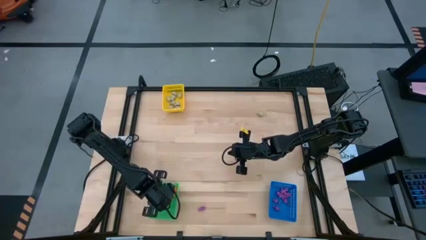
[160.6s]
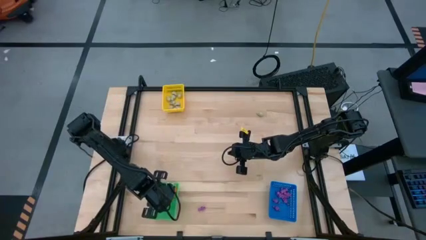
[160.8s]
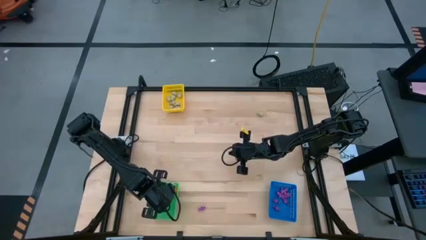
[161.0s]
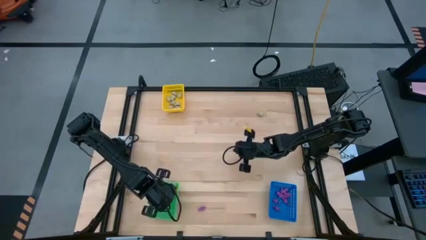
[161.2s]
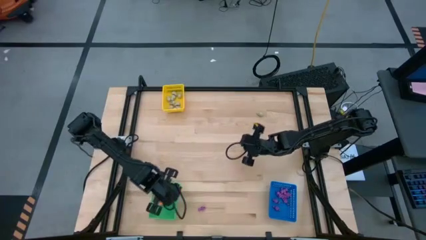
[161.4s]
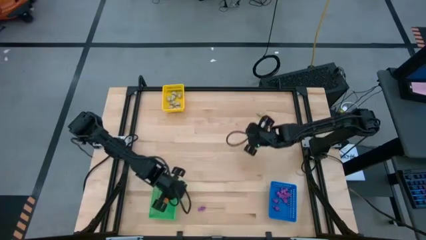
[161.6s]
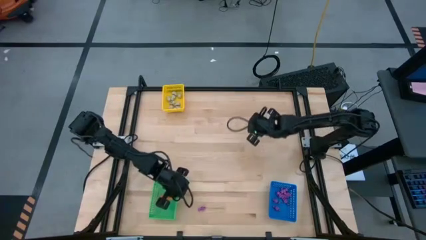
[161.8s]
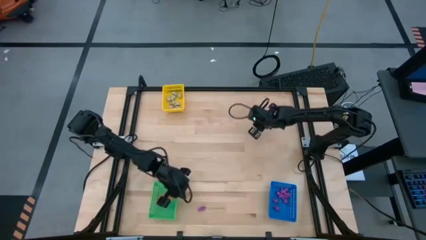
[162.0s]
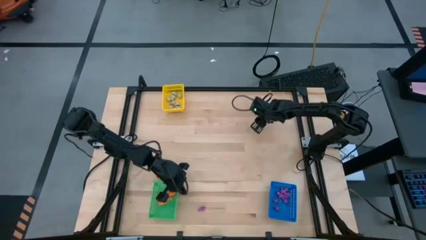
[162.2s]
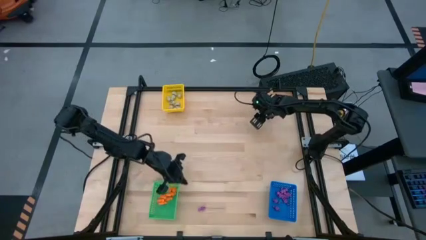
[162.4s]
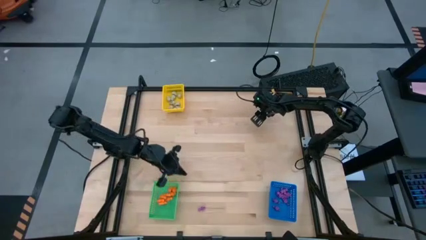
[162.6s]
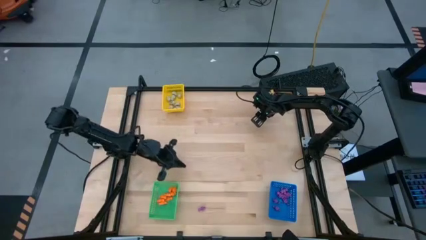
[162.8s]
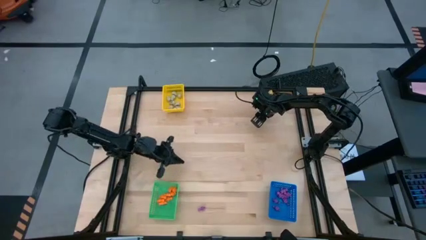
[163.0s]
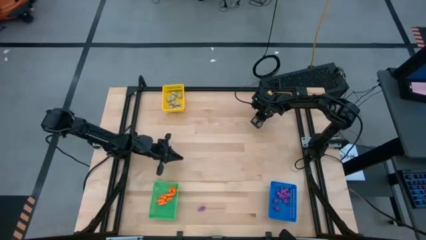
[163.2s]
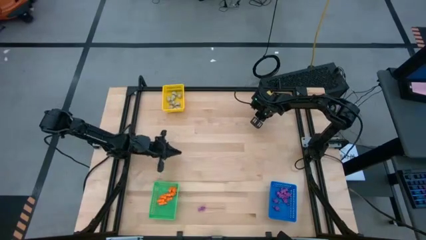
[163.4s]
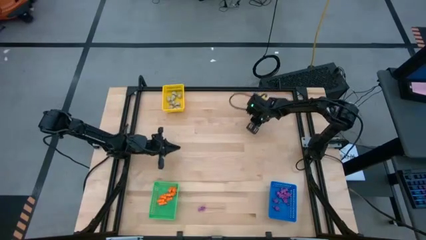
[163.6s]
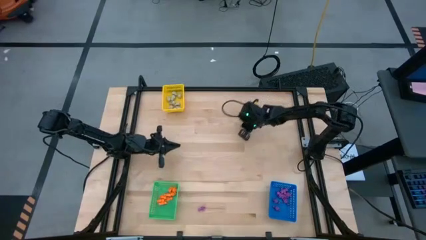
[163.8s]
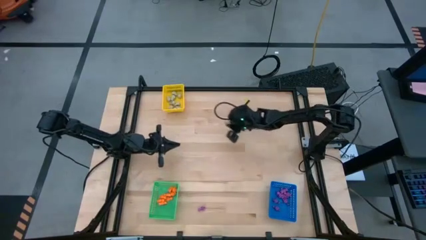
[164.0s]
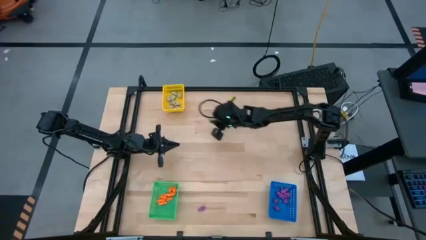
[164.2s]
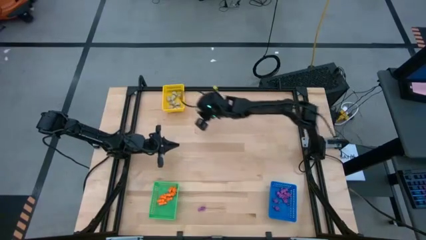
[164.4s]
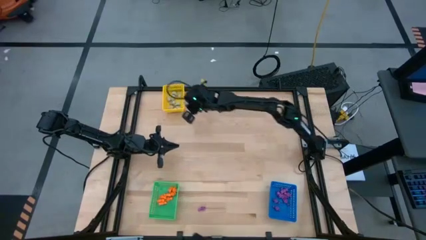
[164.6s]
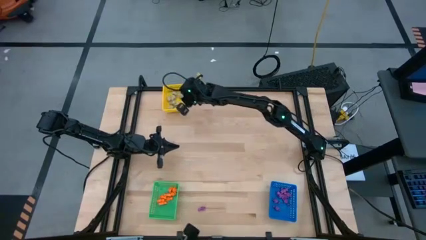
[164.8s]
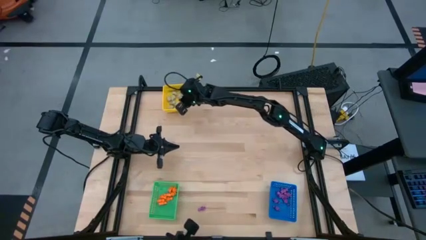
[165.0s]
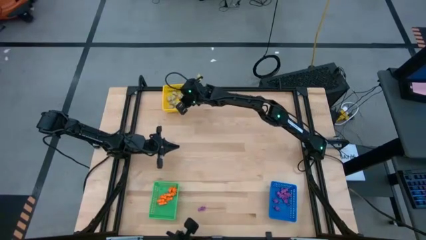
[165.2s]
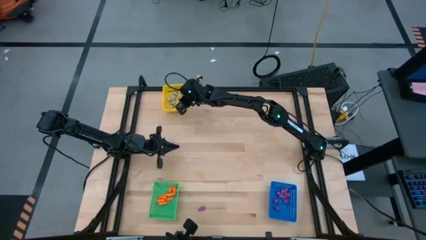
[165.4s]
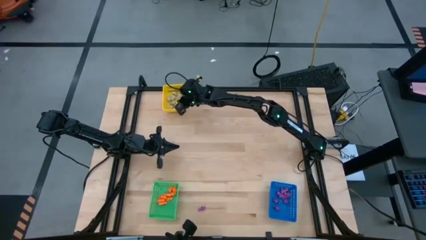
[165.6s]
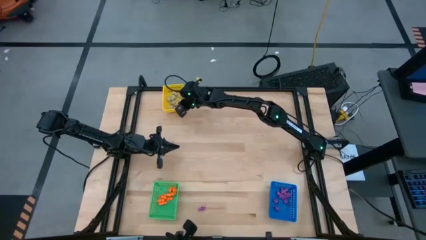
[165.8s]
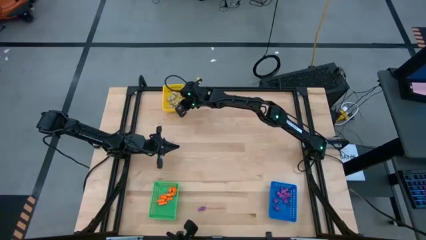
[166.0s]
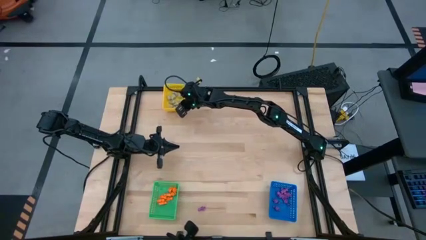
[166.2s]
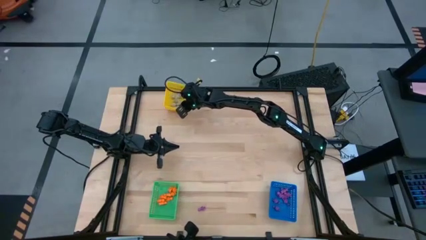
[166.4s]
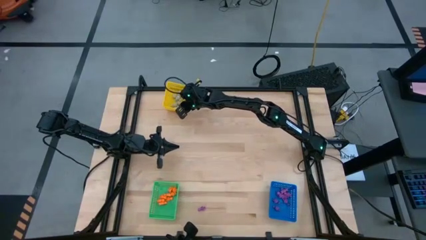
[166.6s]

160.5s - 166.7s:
Task: Sort Halloween decoration
Put the gray skull toy into the yellow bin

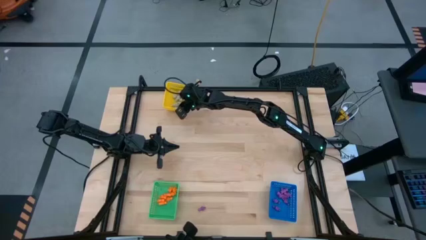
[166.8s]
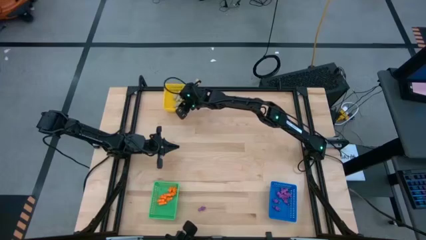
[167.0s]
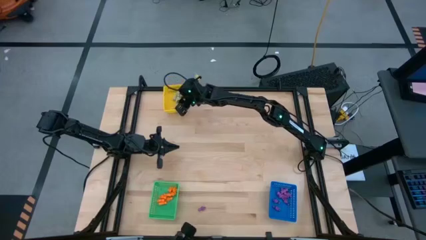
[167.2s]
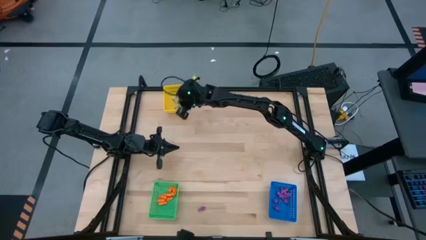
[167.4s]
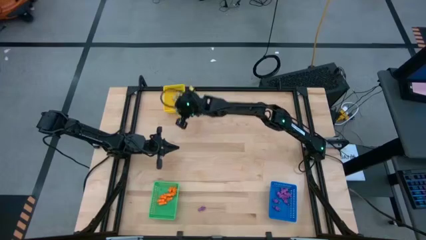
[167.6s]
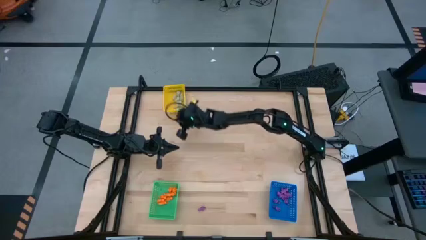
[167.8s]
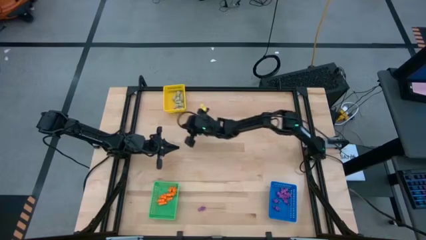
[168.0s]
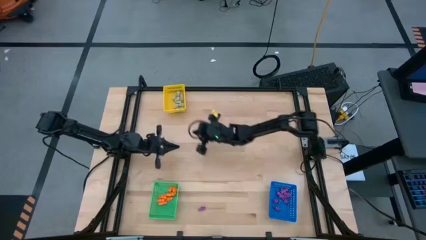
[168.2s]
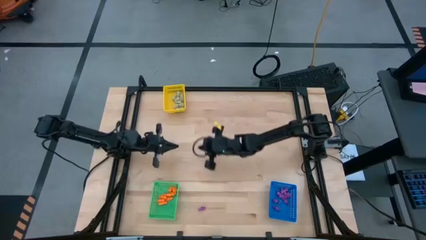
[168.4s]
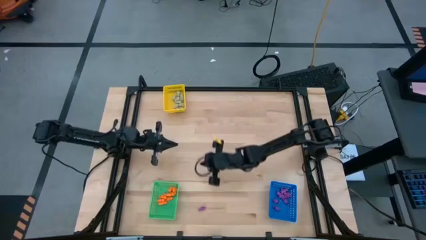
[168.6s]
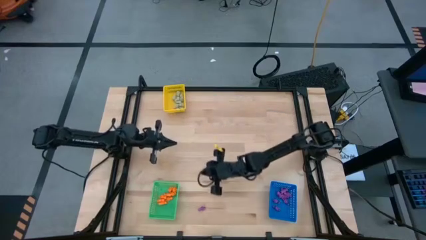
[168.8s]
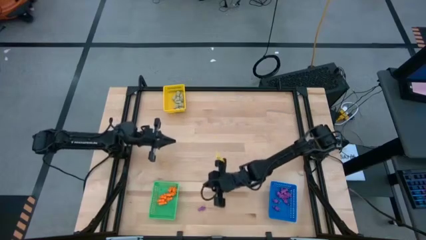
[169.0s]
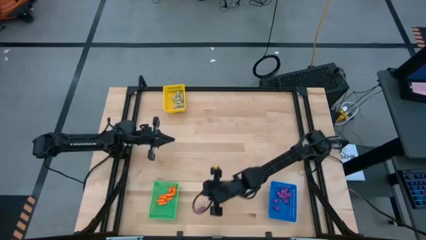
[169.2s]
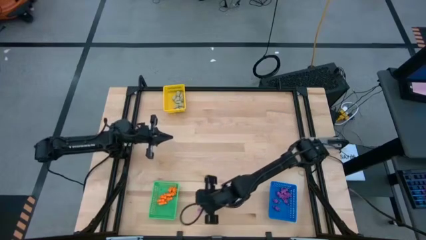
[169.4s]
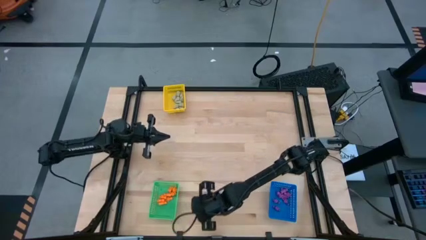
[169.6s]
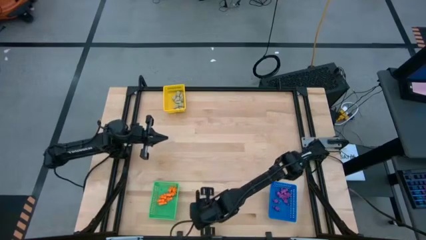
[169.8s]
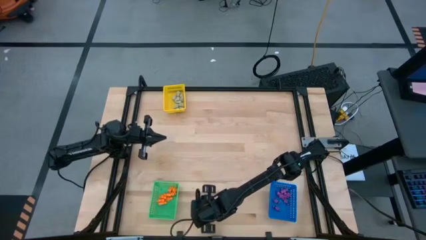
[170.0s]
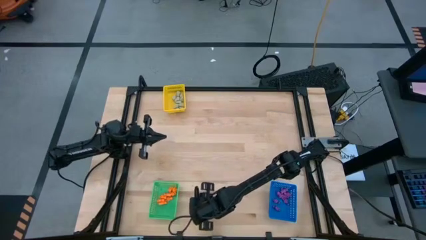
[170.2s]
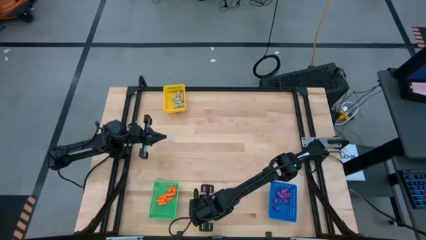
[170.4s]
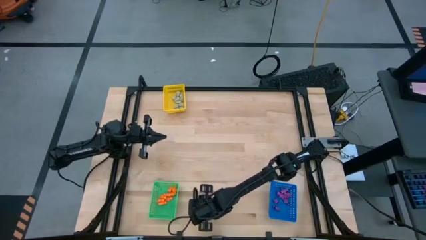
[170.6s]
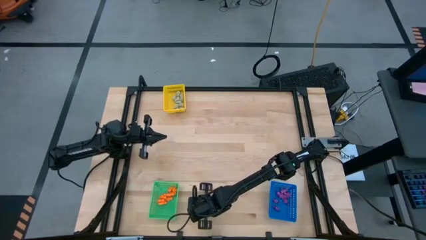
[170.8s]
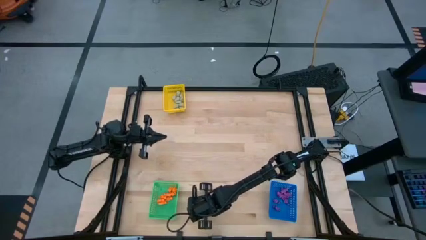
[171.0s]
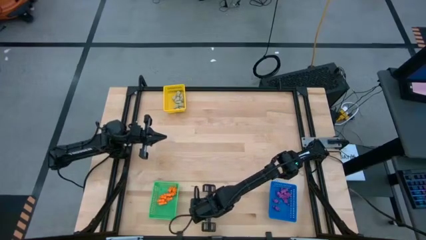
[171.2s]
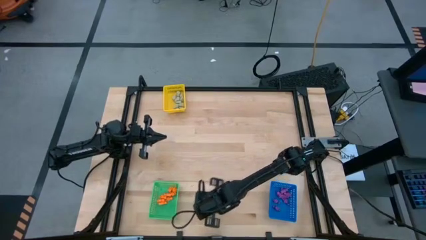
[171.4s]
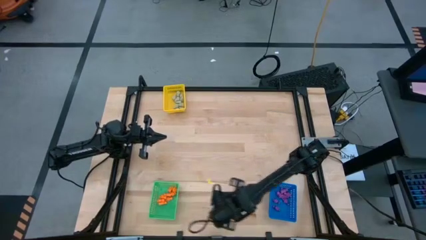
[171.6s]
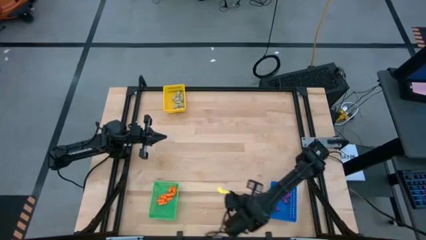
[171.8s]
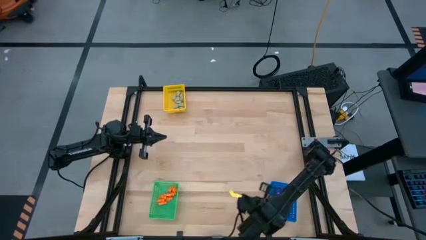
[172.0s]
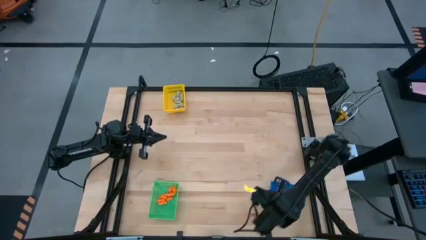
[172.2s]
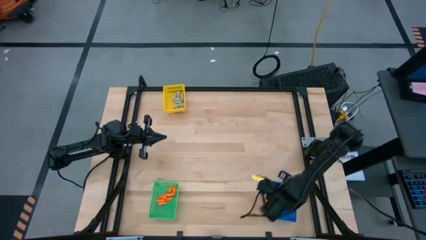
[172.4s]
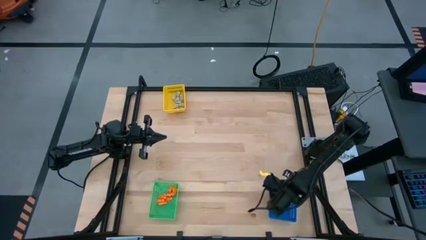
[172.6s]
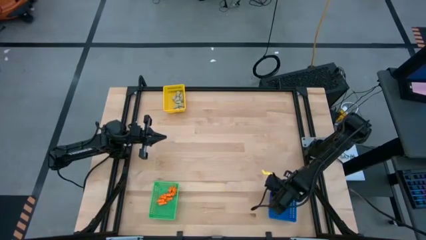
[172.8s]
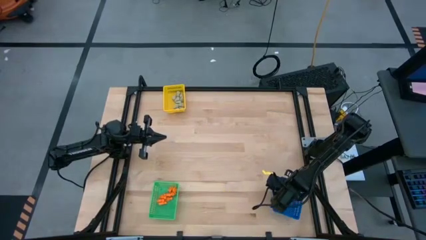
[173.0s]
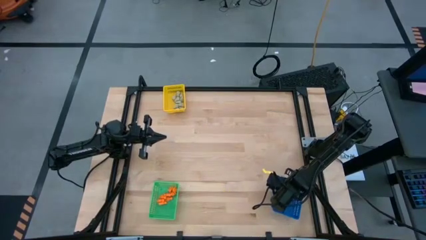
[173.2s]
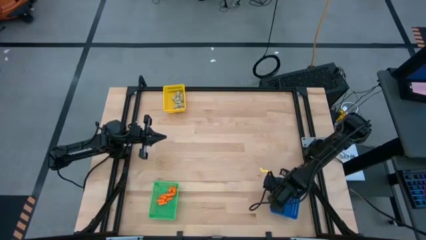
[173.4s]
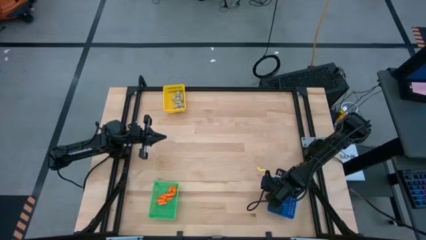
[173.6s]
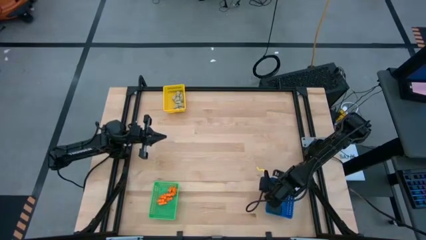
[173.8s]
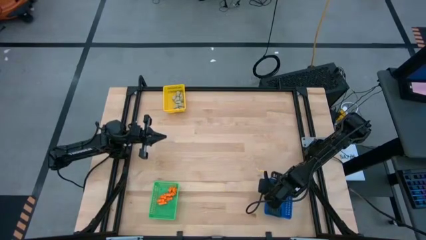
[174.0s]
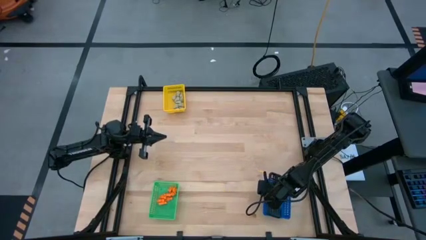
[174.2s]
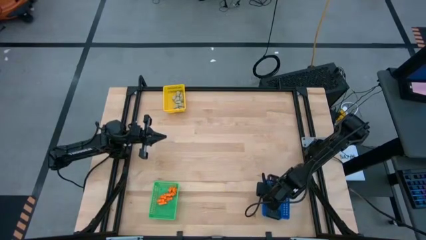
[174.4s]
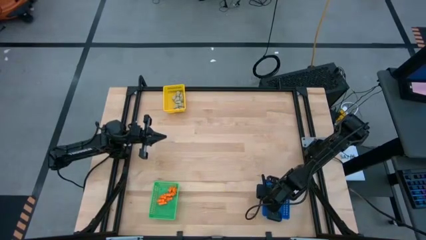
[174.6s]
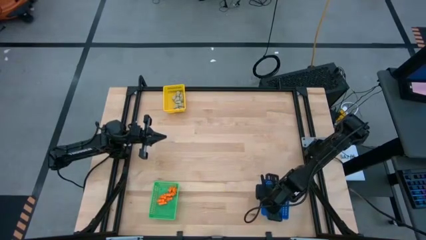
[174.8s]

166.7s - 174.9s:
Put the purple skeleton toy into the blue bin

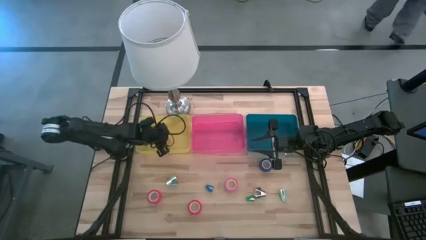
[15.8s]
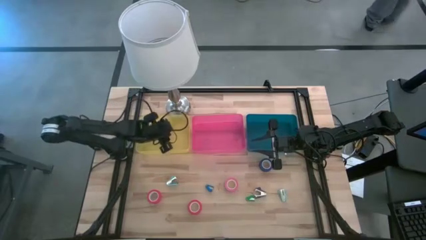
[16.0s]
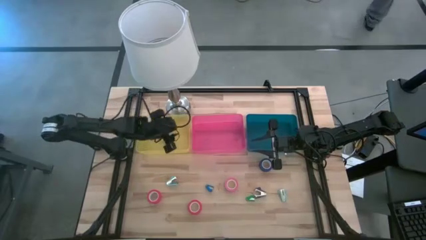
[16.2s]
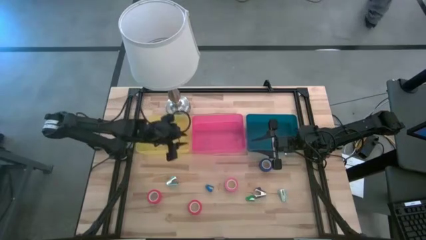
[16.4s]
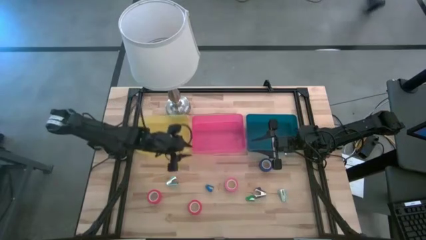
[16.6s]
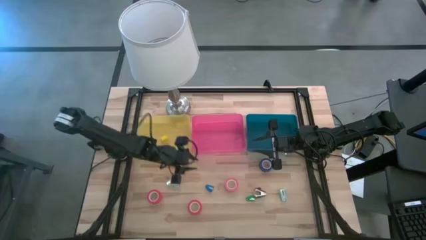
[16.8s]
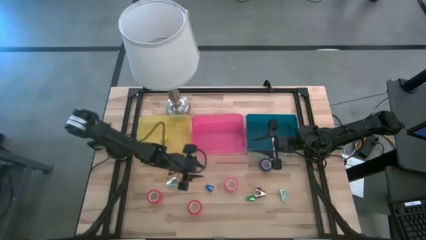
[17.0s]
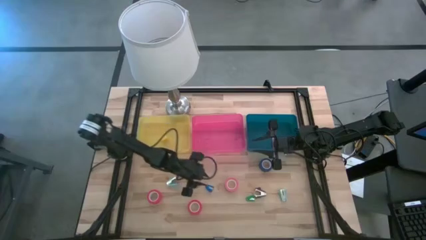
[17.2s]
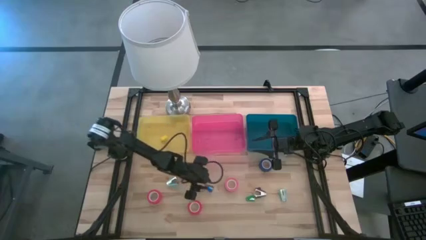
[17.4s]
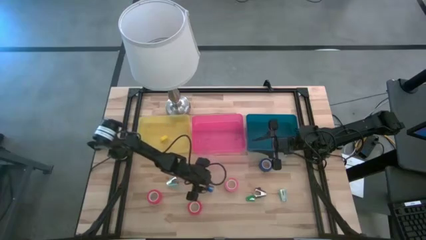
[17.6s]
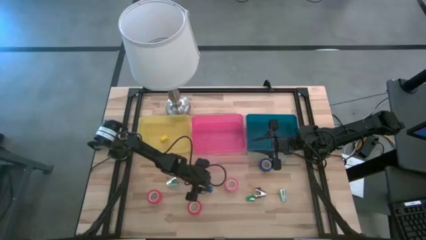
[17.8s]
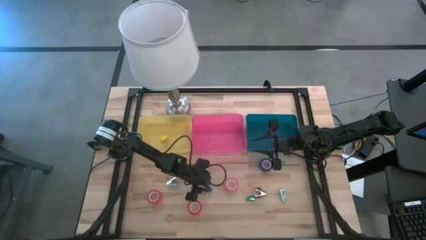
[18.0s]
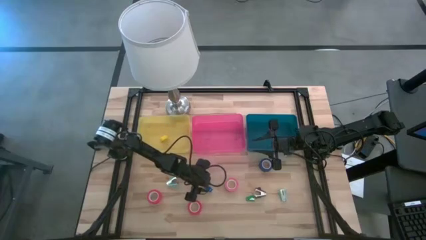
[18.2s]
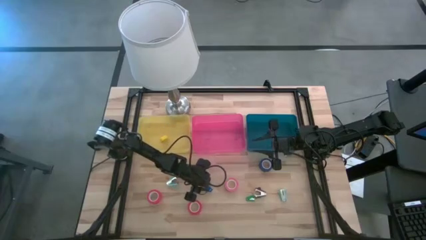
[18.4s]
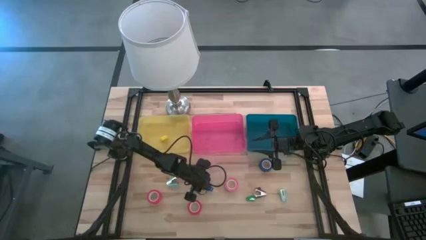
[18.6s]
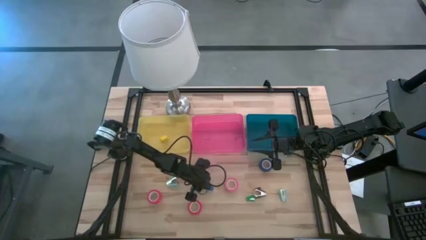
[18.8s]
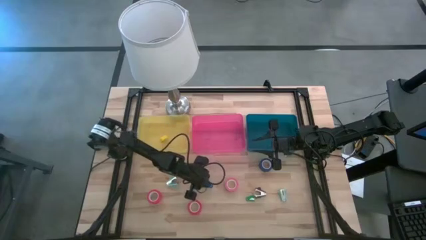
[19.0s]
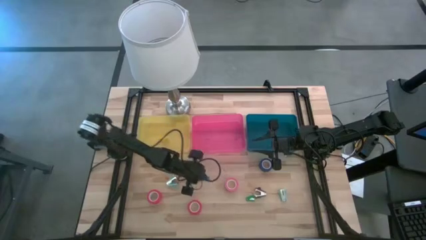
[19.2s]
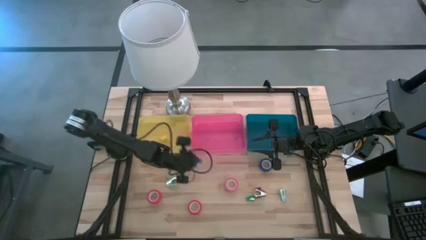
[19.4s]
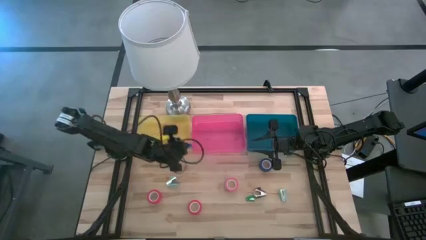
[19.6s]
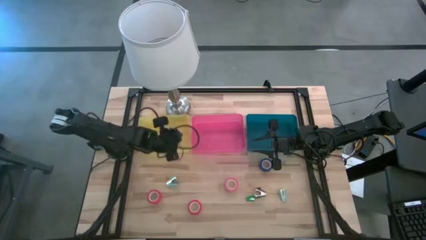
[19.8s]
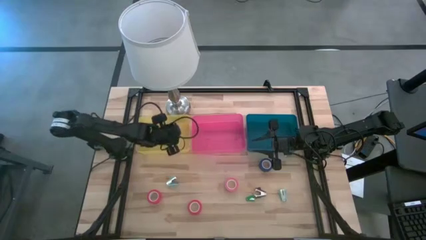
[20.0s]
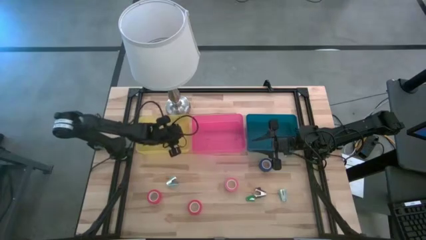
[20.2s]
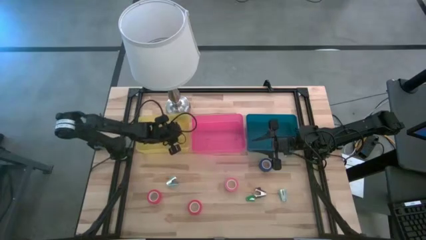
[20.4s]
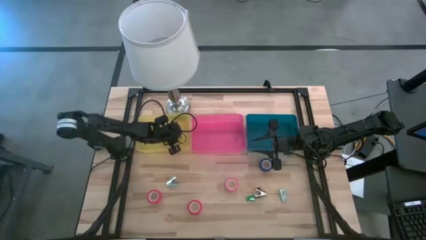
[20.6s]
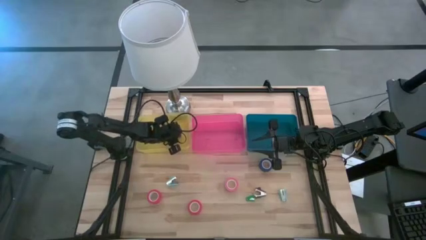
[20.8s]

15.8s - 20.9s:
Task: Pick and place Stapler, Stapler remover, tape
Put the blue stapler into the yellow bin
